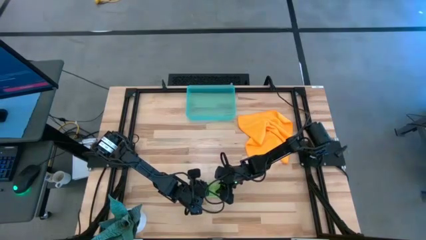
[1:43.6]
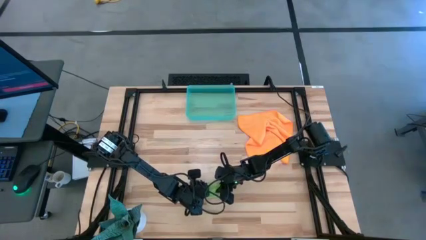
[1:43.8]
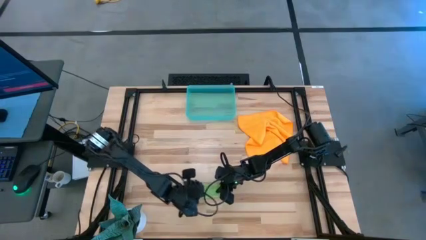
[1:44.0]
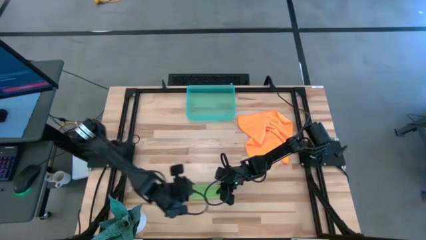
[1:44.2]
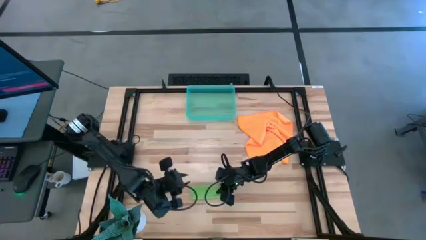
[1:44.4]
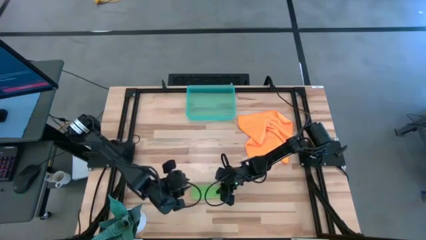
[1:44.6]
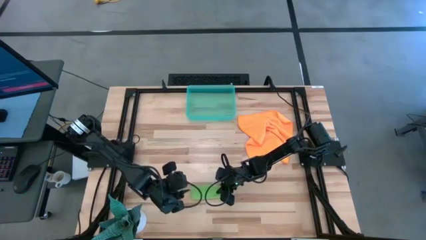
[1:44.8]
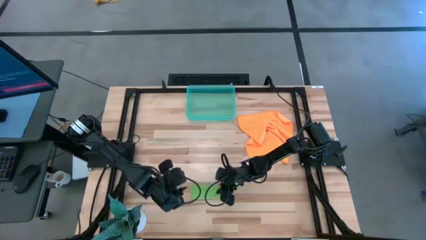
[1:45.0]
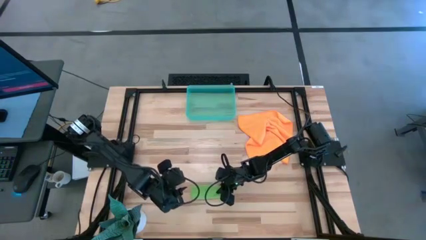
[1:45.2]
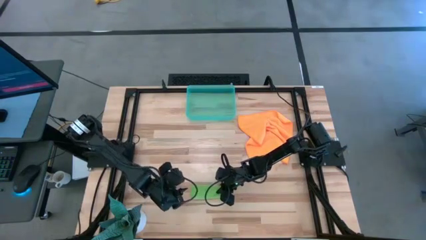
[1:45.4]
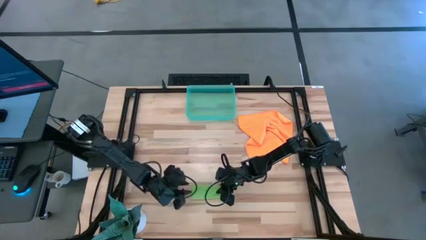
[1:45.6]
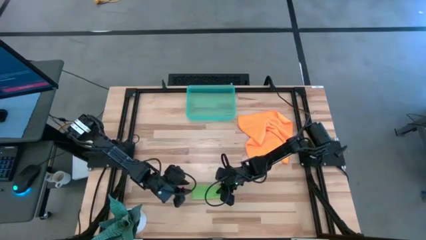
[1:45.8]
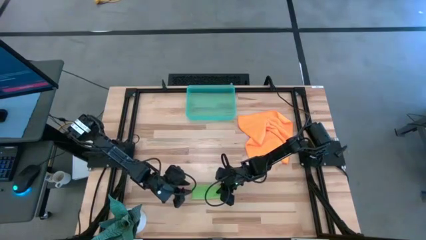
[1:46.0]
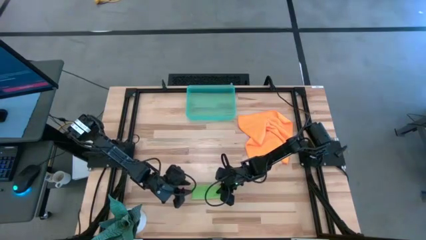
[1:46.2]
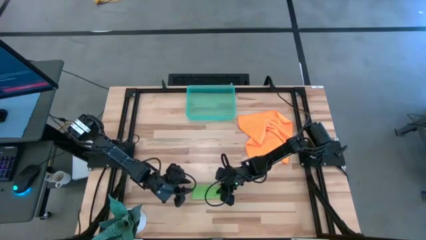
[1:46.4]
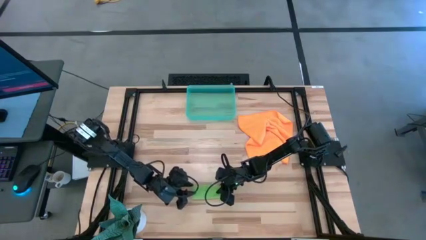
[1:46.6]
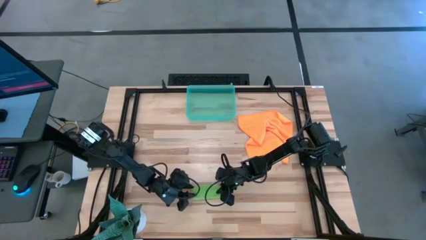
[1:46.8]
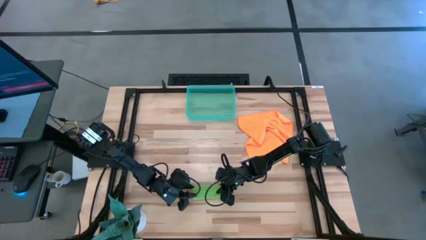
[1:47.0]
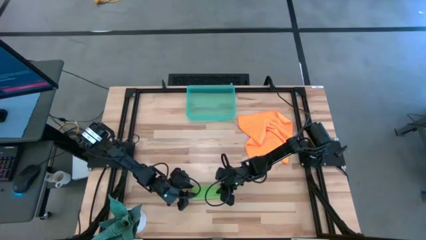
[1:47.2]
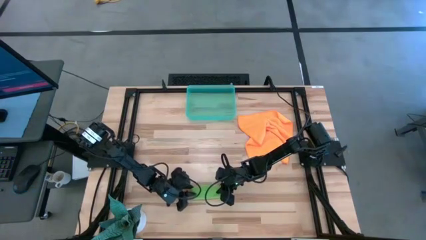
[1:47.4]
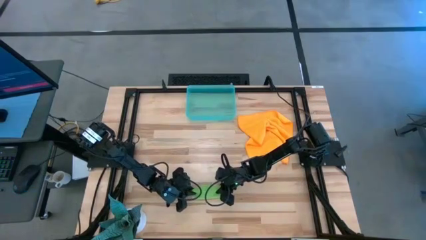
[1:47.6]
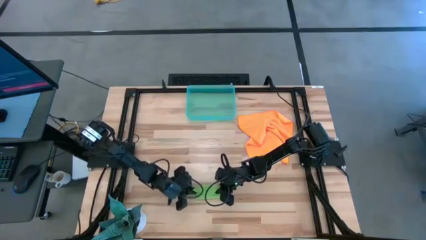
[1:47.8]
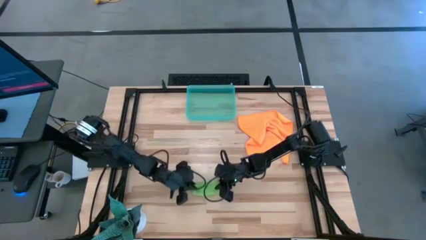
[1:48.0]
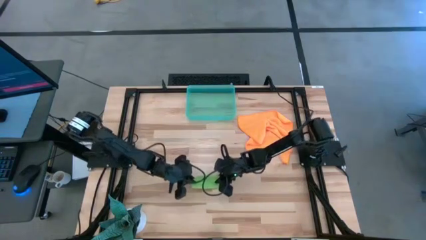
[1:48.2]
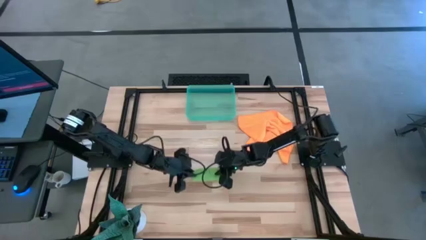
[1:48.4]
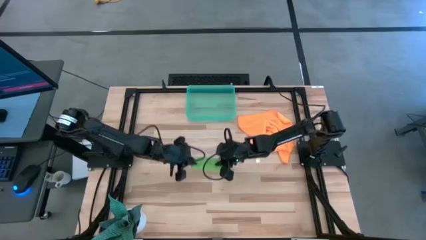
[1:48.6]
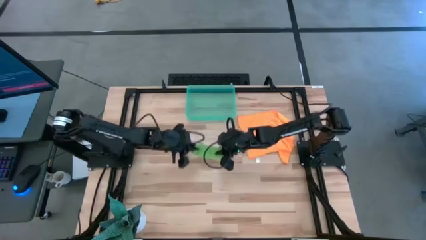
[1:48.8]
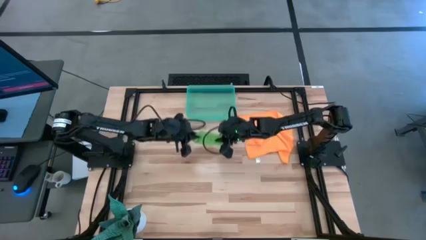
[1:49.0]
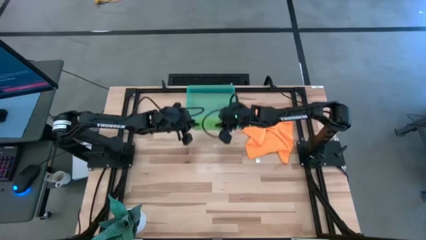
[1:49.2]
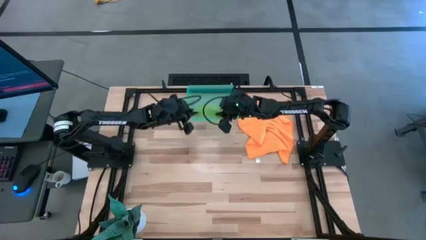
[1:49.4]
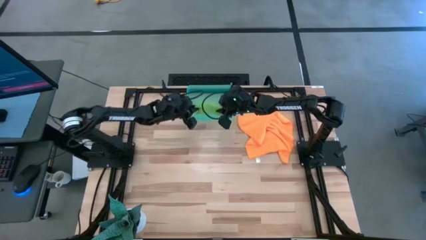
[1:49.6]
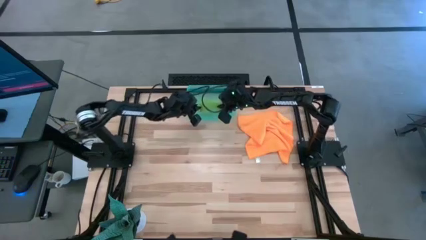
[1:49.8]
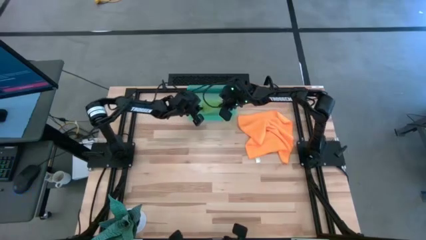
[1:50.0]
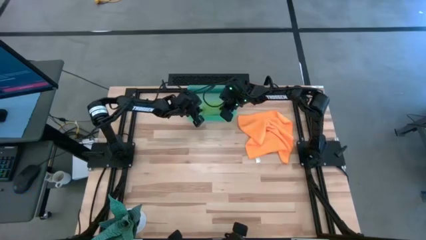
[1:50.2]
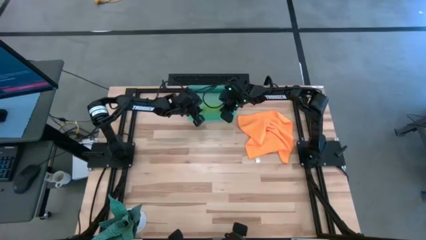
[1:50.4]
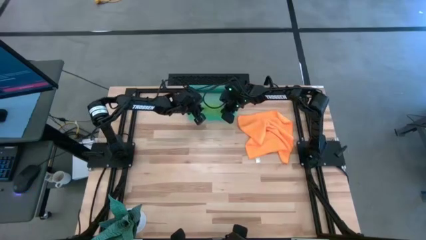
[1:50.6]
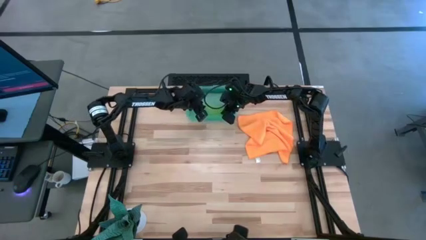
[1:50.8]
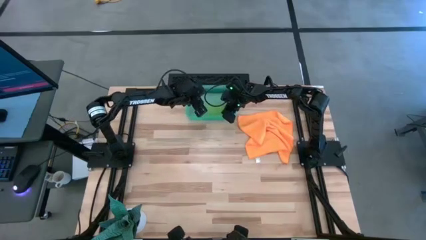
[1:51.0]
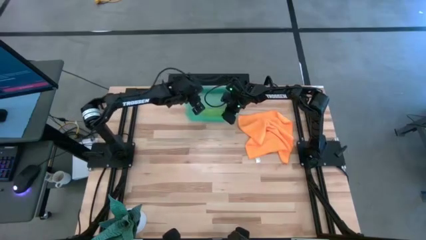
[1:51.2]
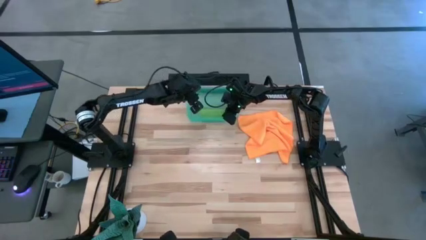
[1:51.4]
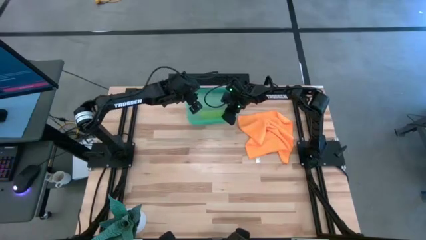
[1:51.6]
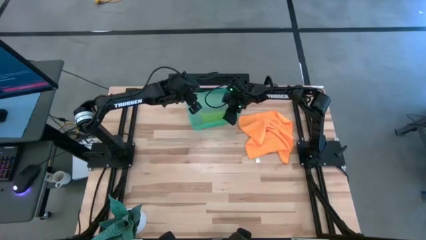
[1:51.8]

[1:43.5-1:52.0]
Task: Roll microfiber towels into tight, uniform cylinder then place into a basket
Put the green towel into the green bin

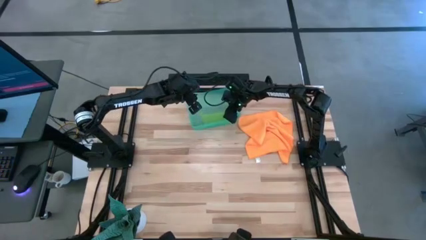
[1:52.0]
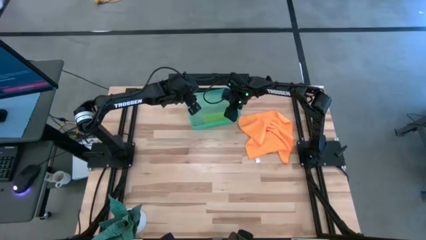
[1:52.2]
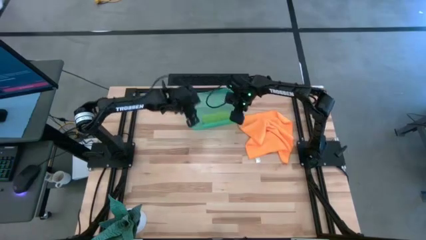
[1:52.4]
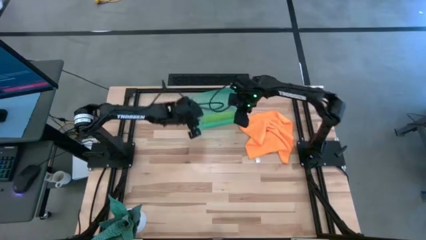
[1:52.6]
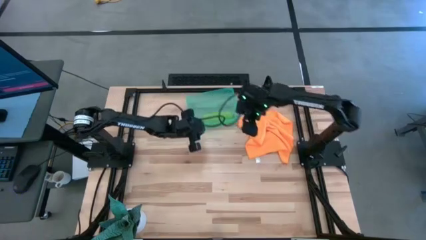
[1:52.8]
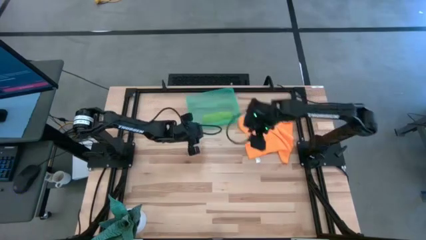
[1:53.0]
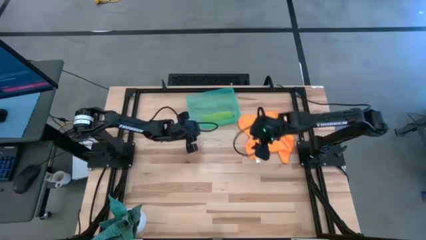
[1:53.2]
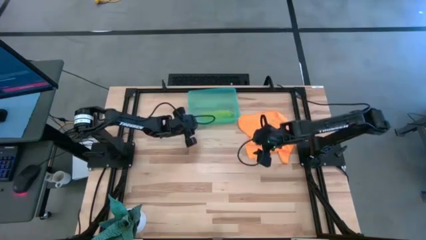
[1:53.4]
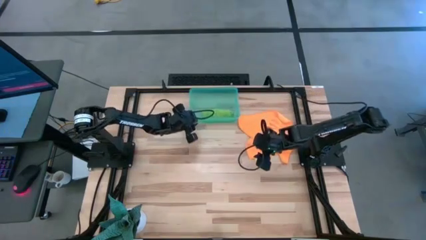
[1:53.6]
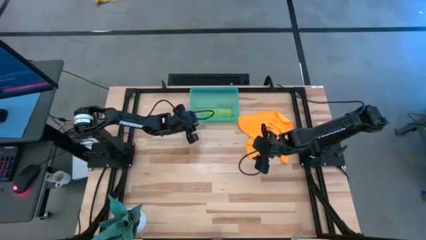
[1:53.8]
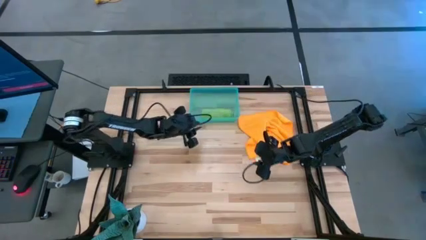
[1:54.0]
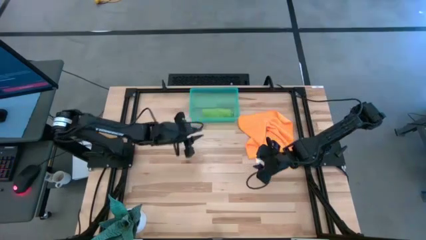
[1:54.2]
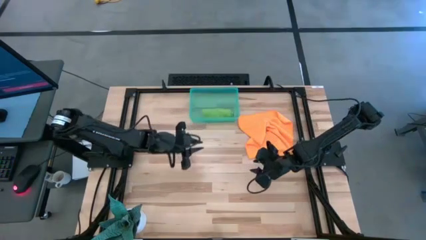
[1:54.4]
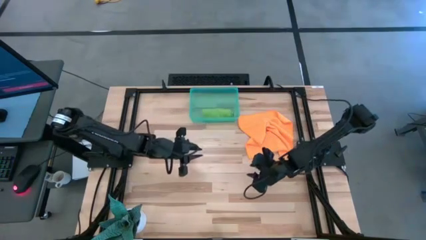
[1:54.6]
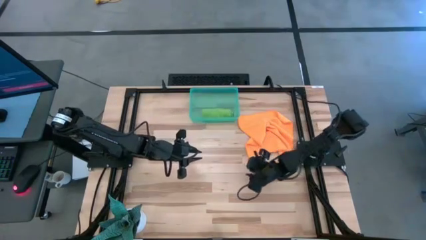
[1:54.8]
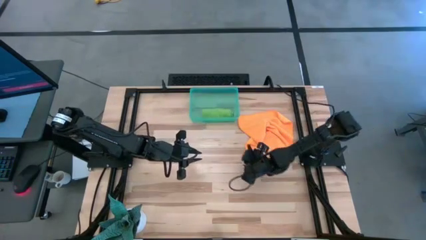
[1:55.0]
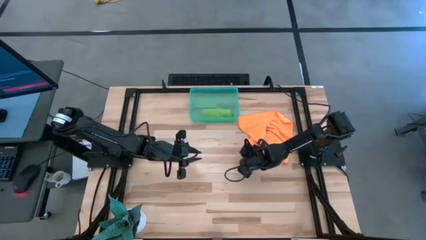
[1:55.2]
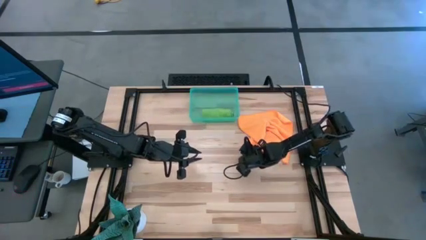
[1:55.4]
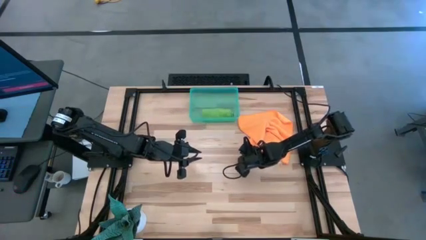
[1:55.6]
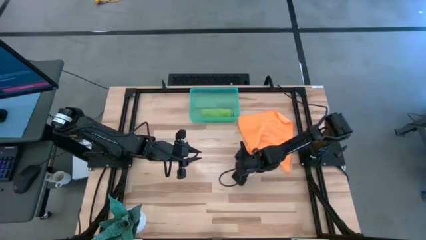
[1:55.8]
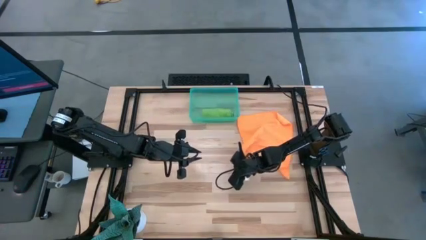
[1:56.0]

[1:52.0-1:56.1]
Fold the orange towel
